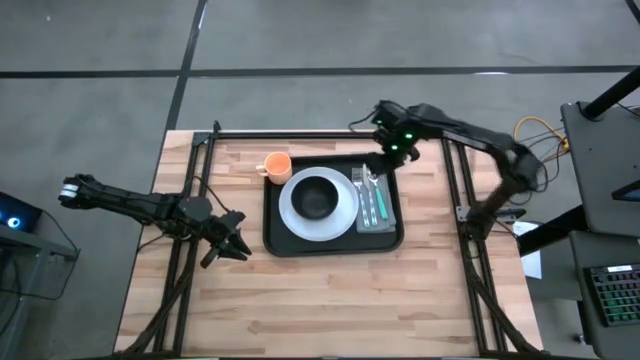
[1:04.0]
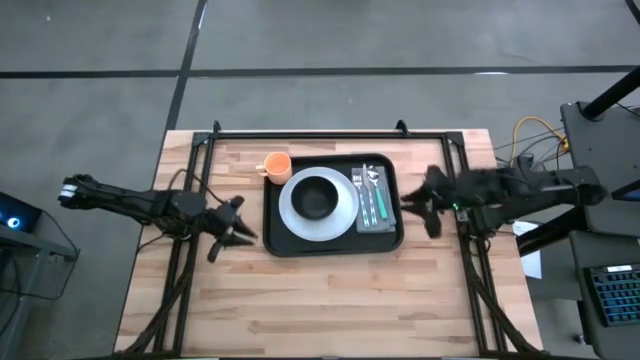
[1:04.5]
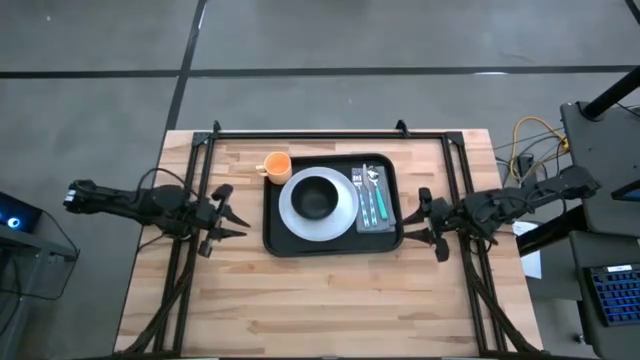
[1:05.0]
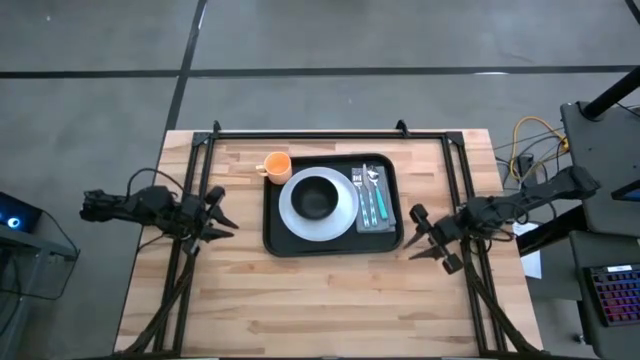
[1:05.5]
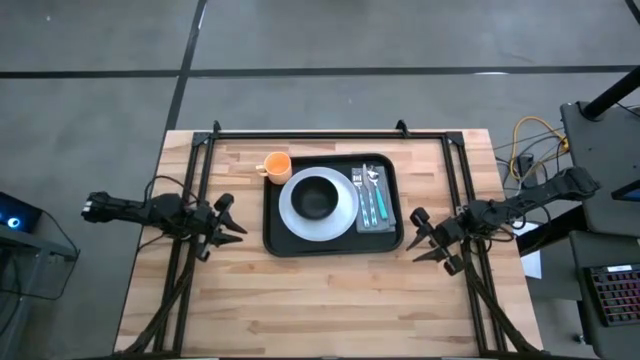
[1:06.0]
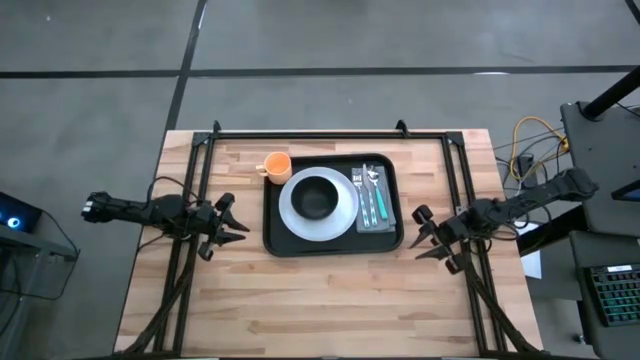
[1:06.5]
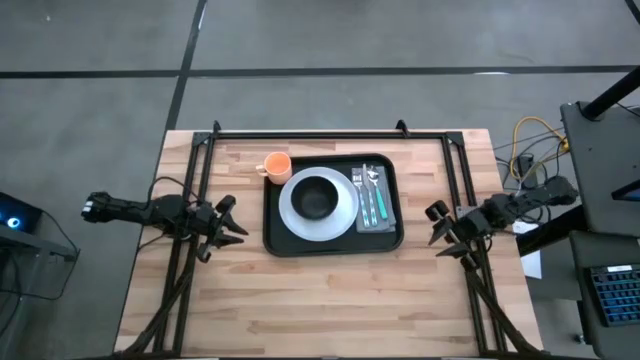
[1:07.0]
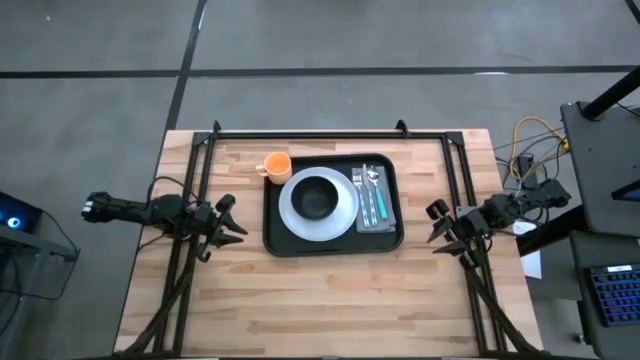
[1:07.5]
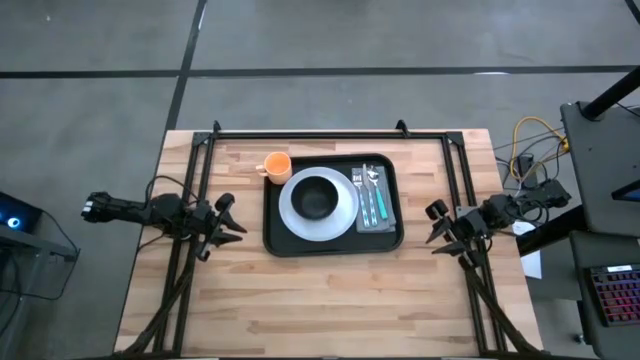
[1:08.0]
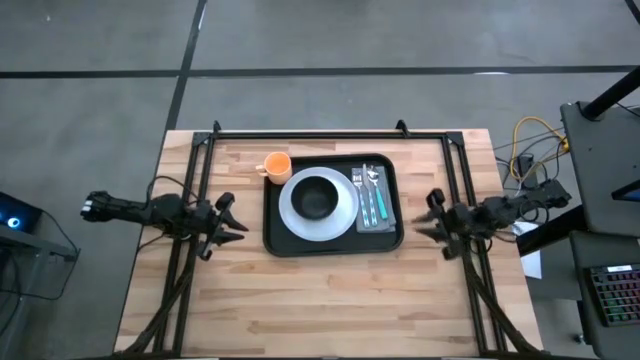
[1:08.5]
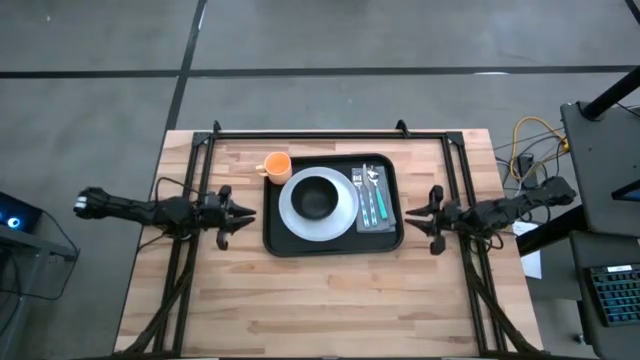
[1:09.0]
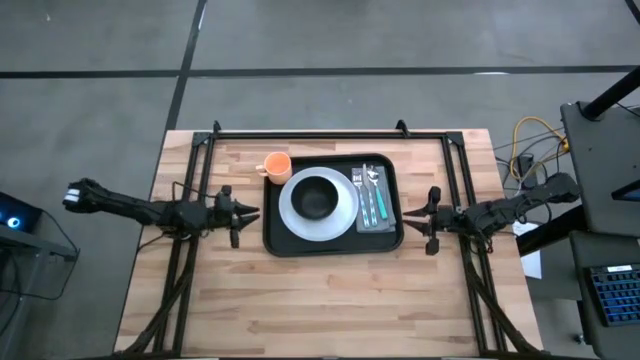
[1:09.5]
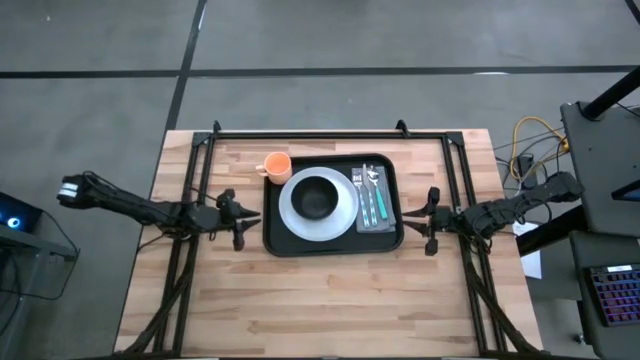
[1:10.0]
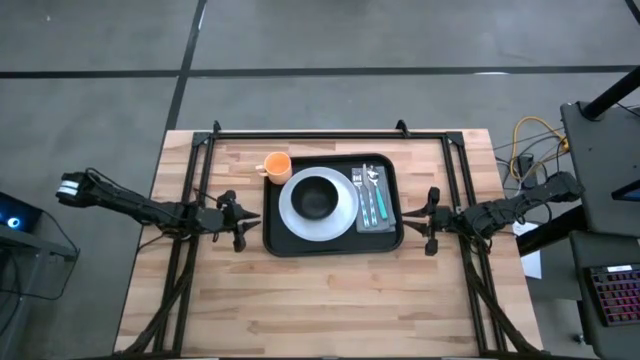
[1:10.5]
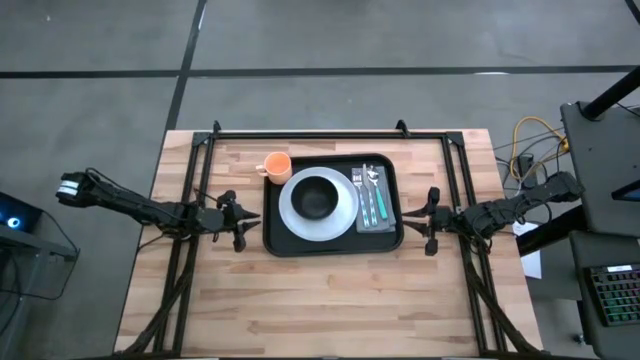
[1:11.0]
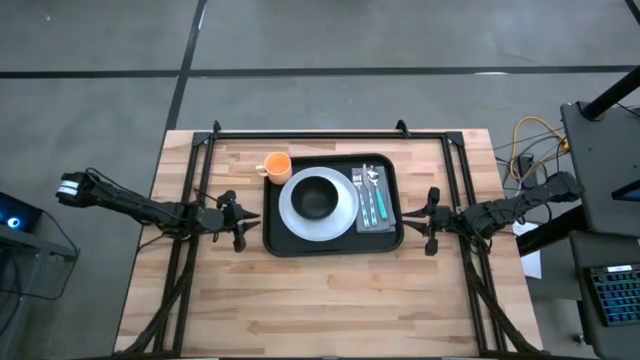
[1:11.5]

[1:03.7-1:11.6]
Task: Set up tray
Return to Home Position

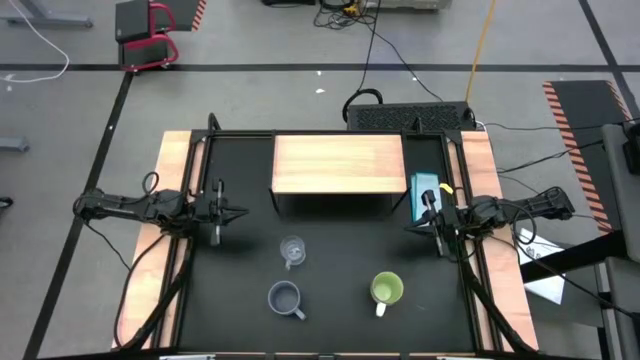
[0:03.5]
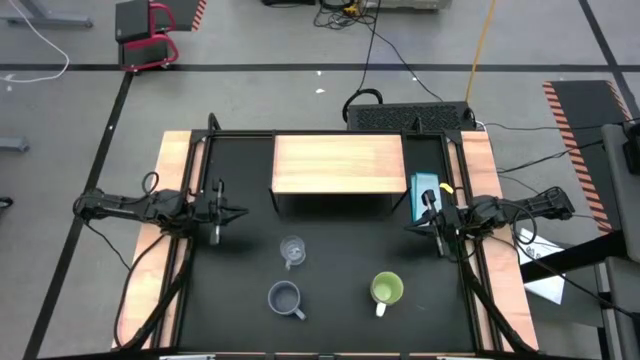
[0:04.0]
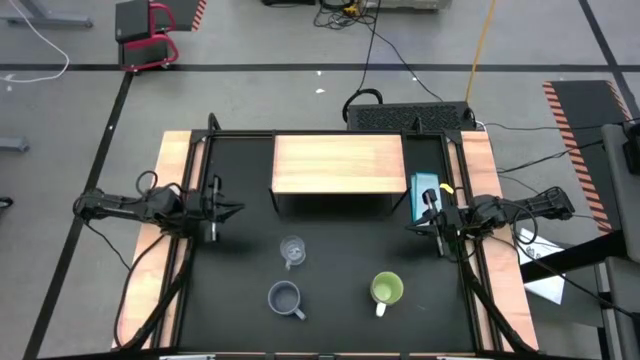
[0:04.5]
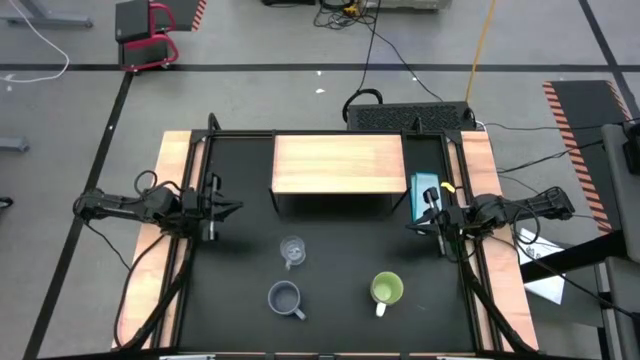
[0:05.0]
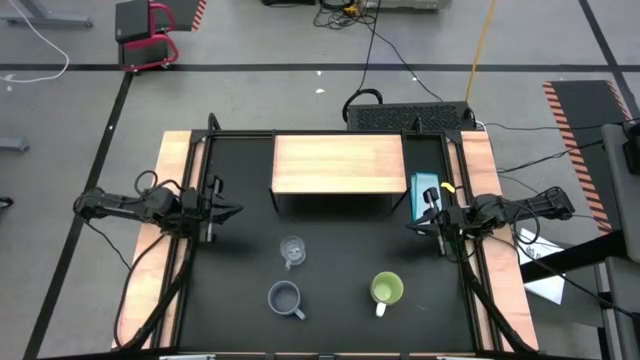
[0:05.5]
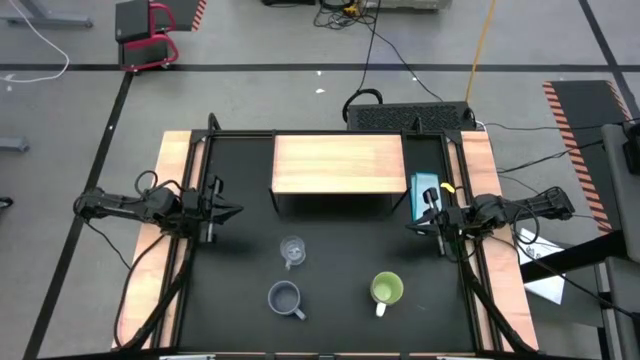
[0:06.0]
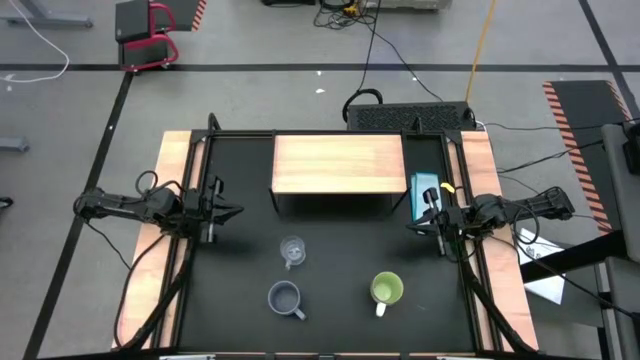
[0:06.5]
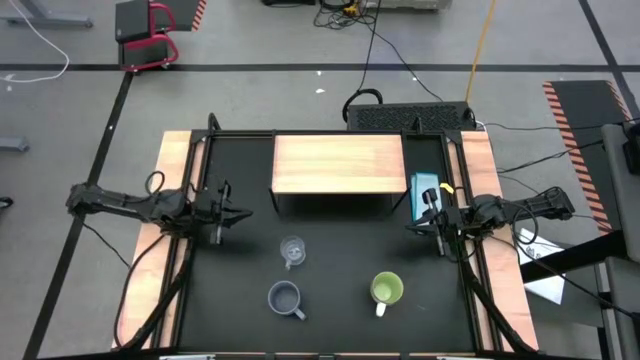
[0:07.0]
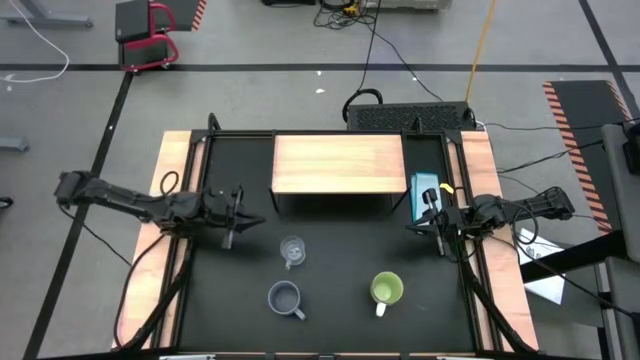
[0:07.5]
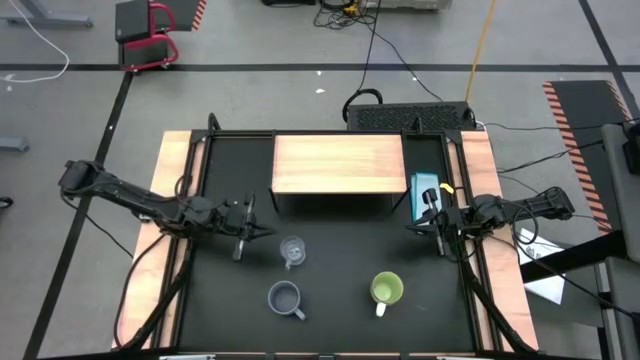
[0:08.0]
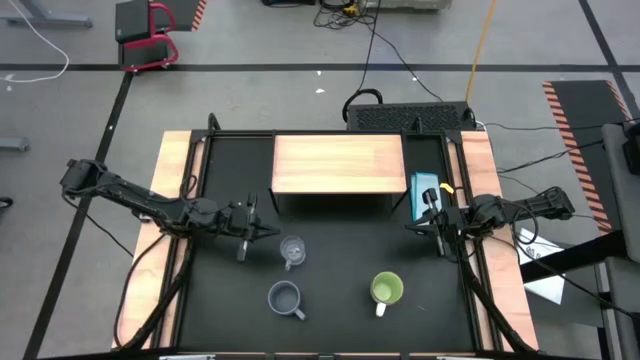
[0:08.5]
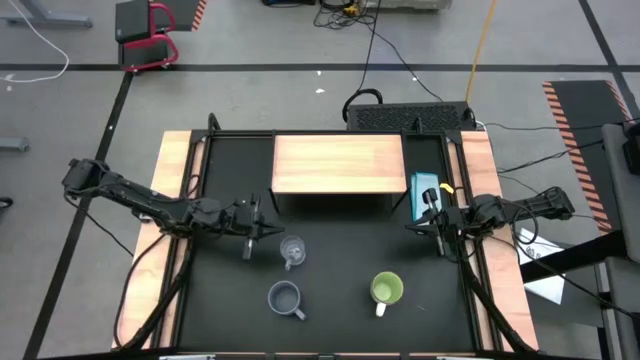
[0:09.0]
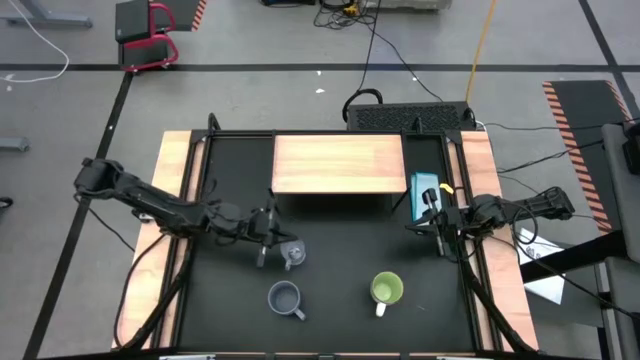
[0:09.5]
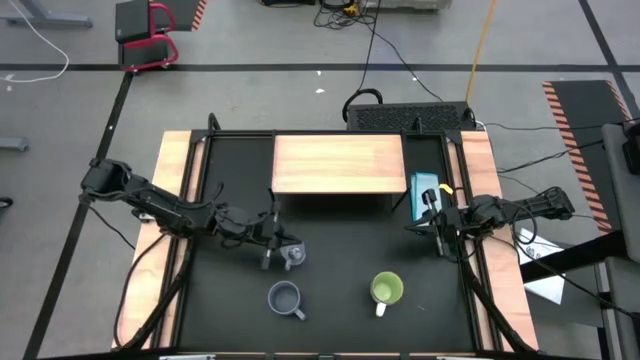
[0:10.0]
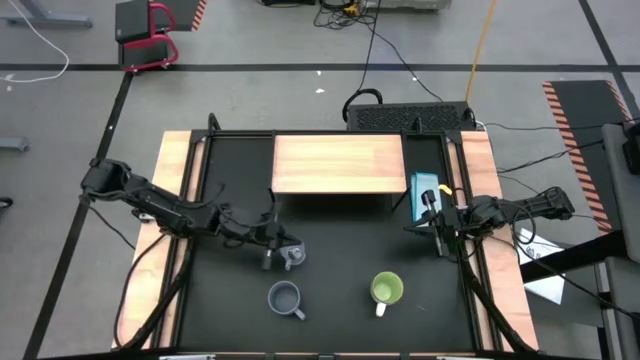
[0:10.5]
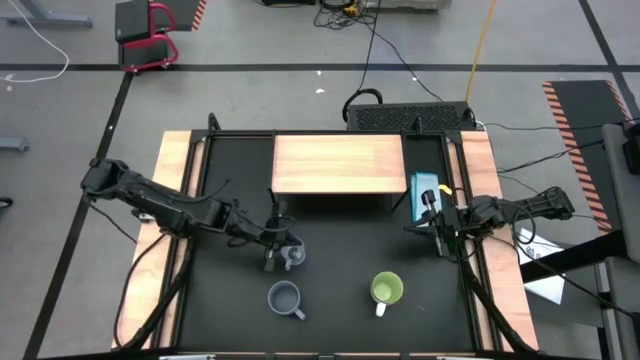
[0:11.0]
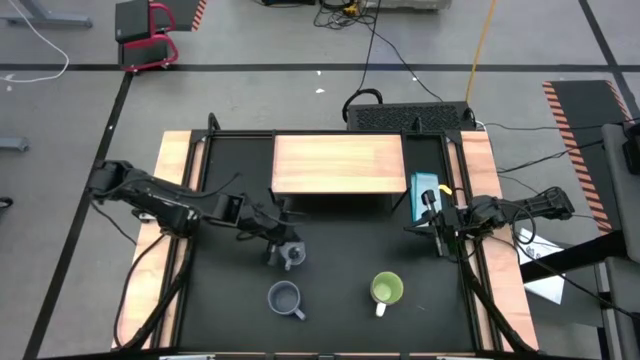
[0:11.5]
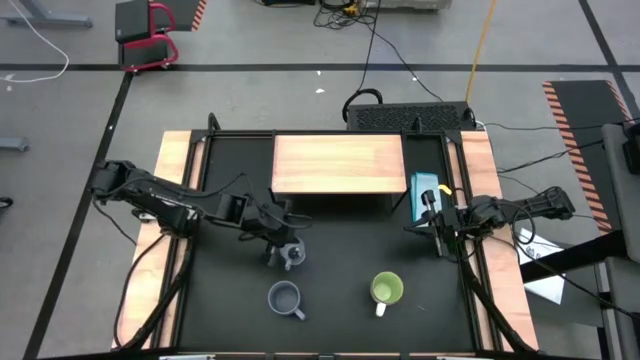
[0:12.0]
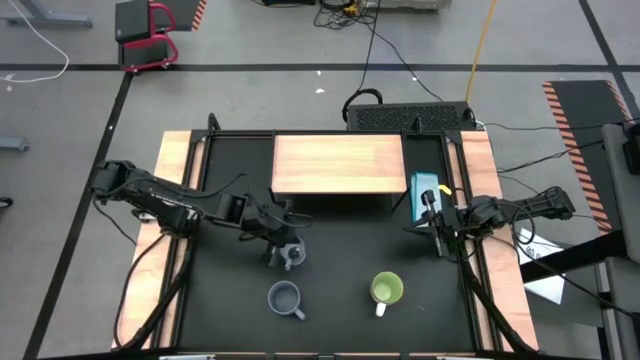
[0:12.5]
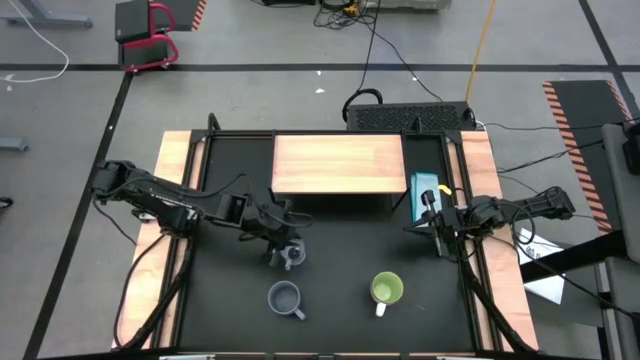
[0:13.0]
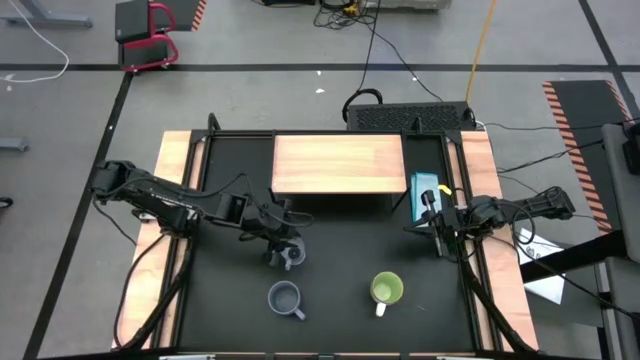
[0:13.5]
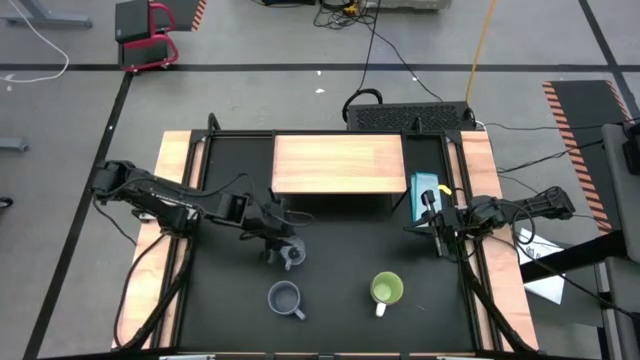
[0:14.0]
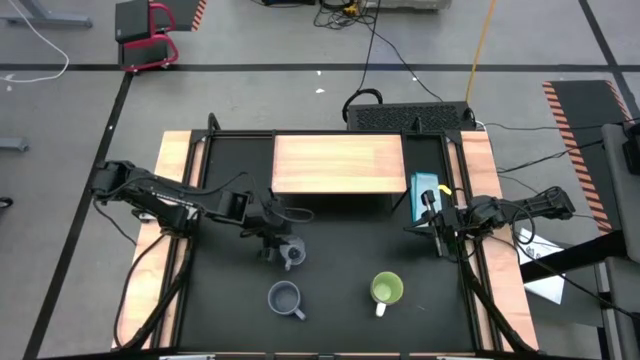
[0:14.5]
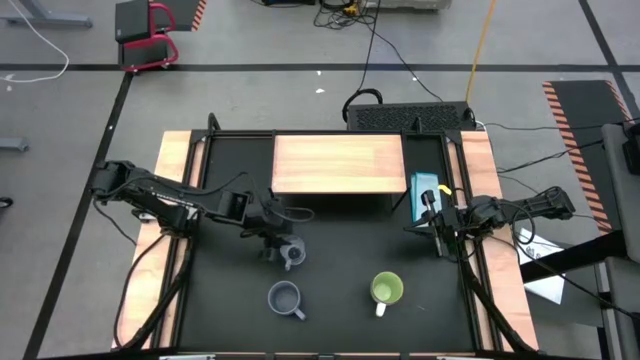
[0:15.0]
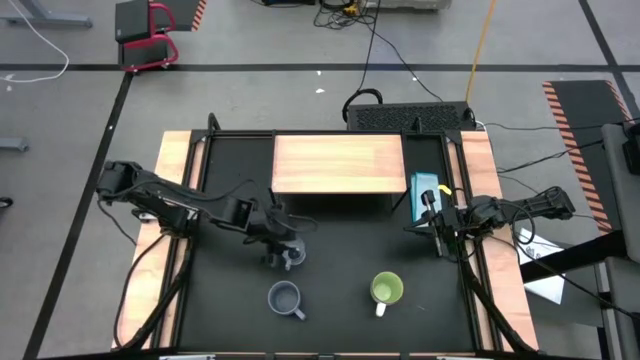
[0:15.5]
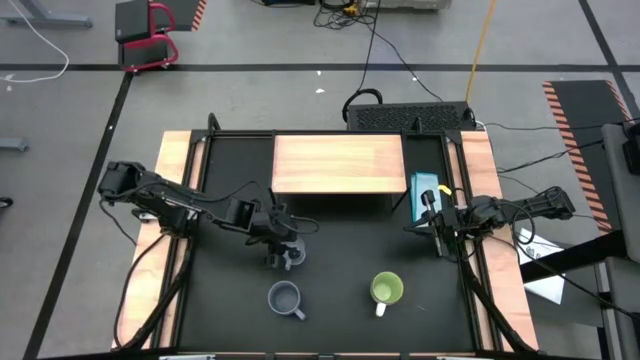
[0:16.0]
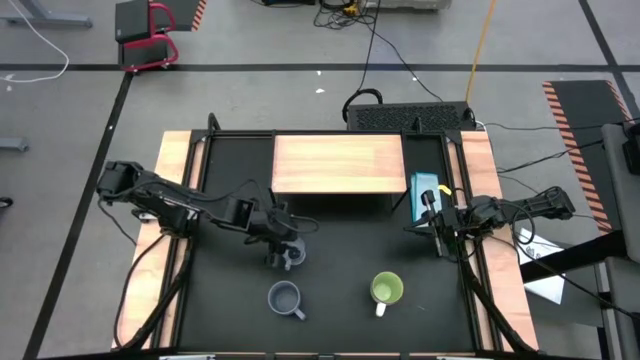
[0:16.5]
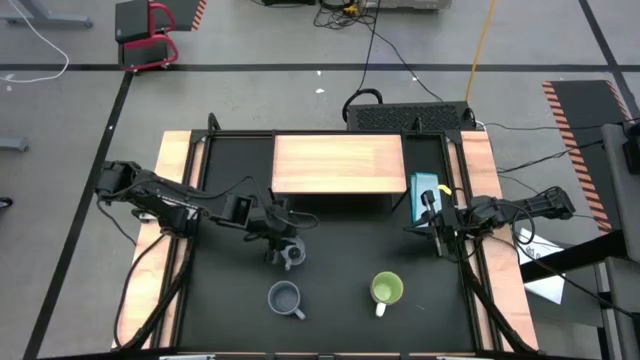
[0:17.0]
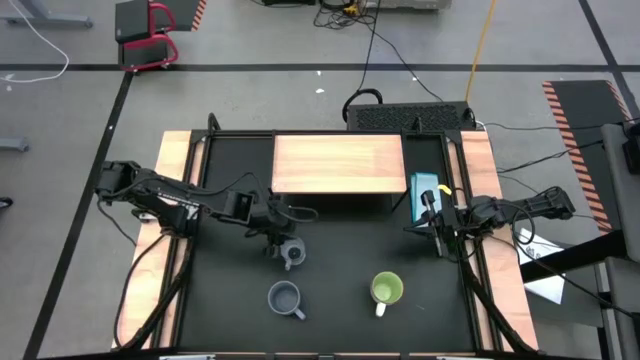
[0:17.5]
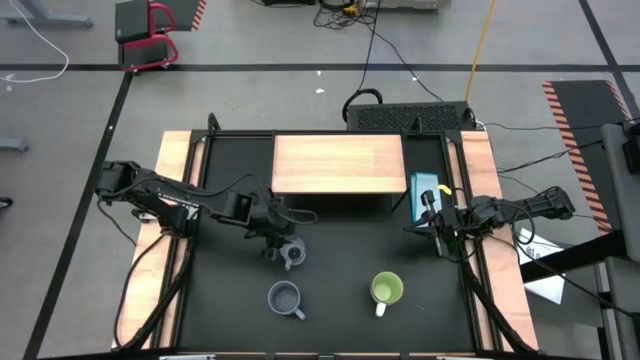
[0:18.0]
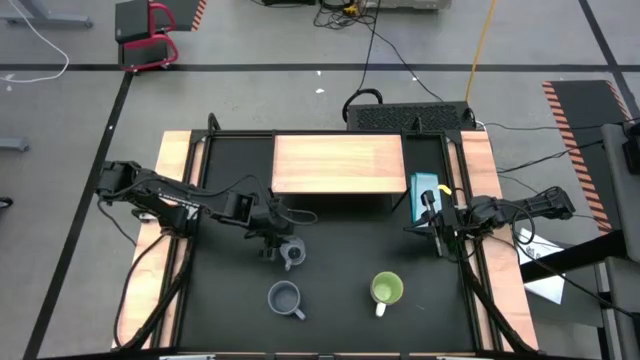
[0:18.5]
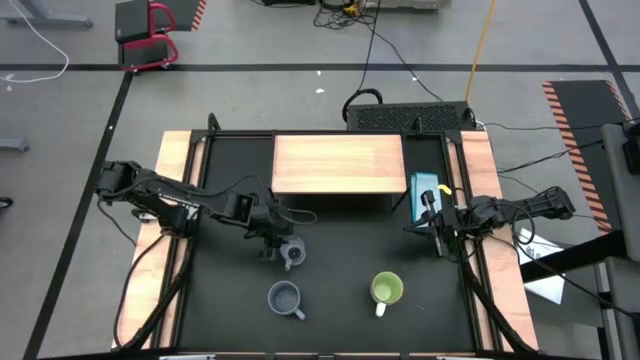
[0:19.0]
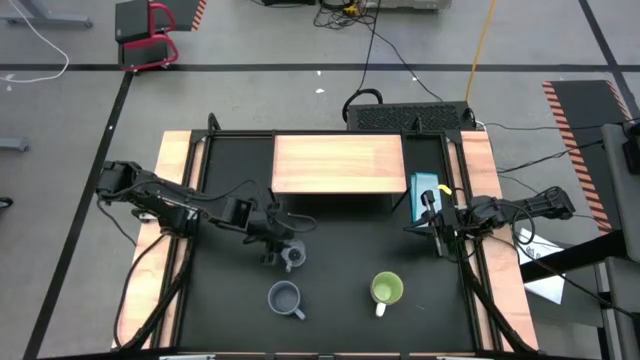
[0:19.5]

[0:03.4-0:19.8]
Task: Stack small to large cups/mugs on shelf
Put the transparent mug on the shelf
